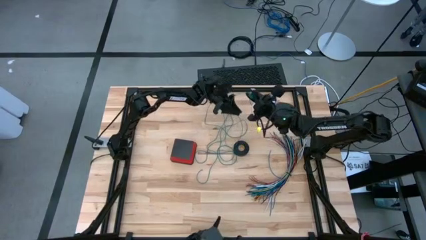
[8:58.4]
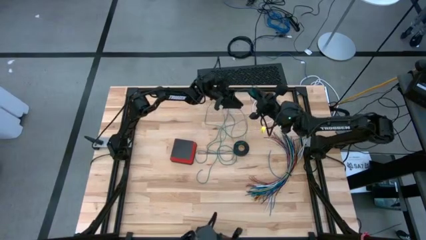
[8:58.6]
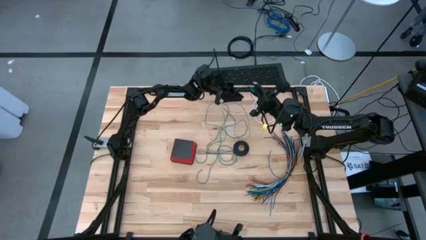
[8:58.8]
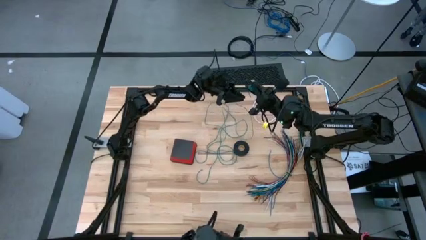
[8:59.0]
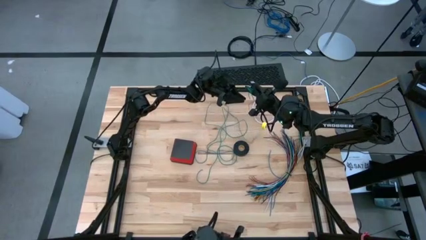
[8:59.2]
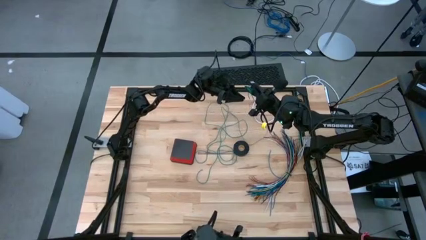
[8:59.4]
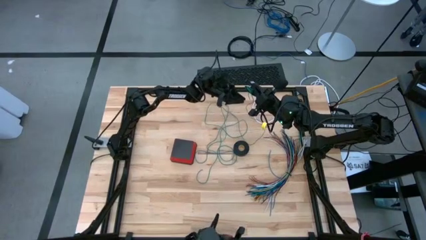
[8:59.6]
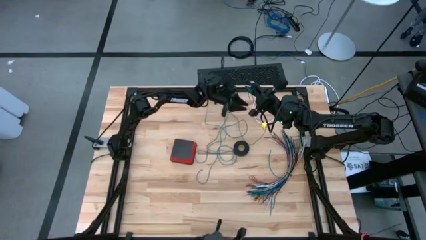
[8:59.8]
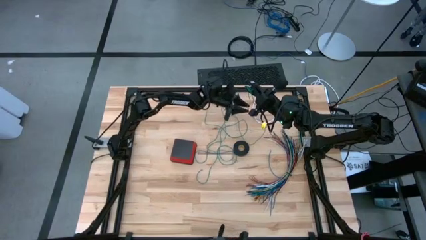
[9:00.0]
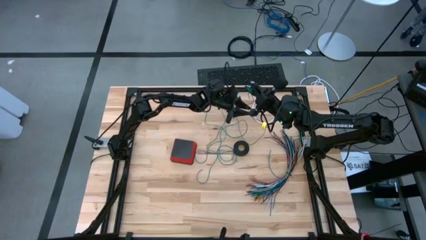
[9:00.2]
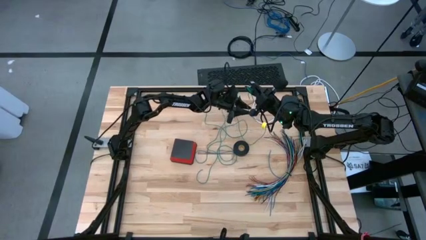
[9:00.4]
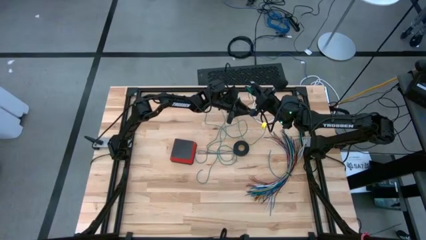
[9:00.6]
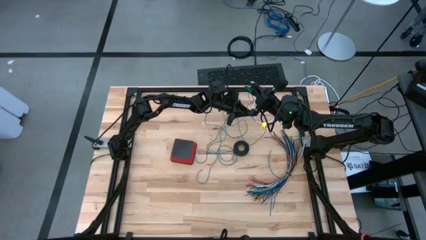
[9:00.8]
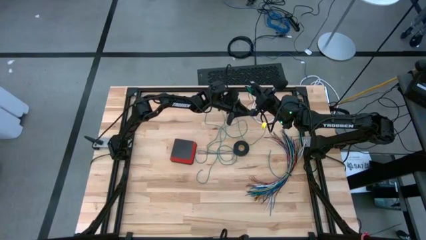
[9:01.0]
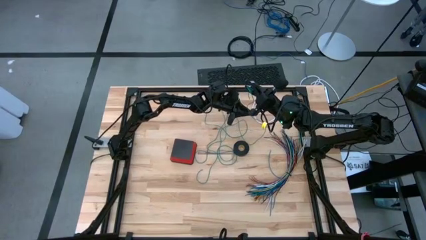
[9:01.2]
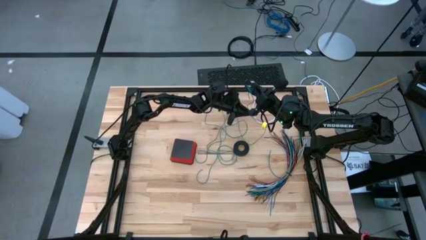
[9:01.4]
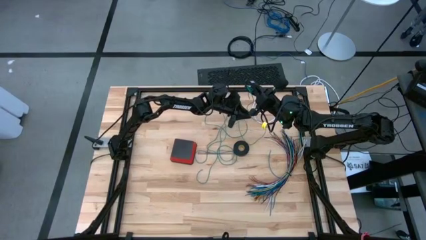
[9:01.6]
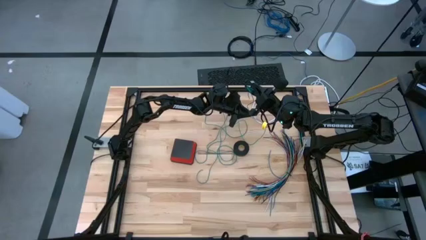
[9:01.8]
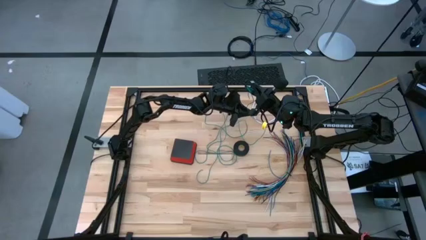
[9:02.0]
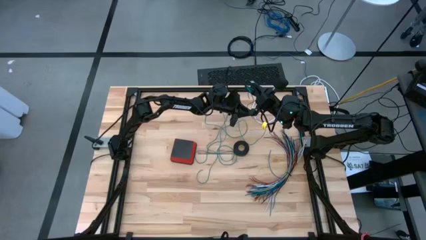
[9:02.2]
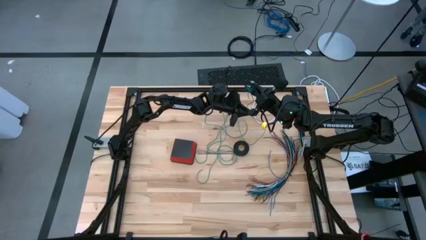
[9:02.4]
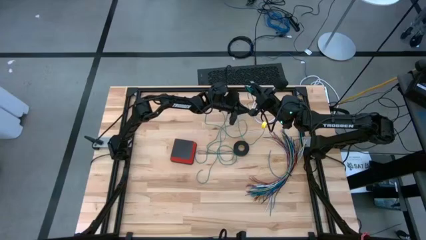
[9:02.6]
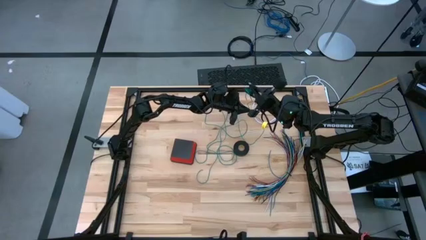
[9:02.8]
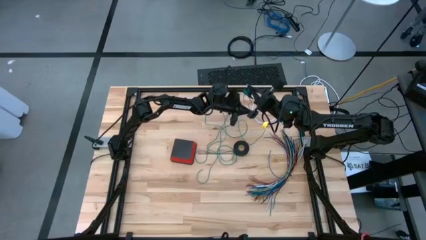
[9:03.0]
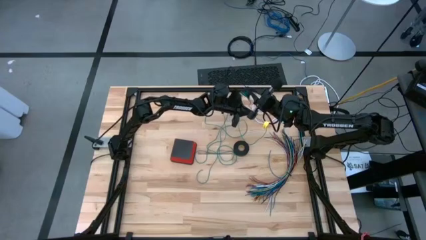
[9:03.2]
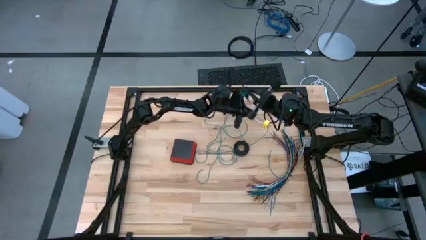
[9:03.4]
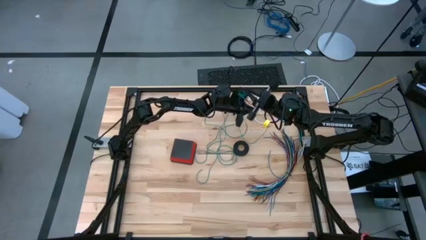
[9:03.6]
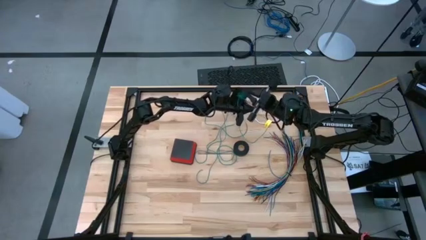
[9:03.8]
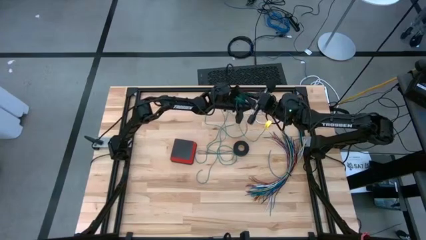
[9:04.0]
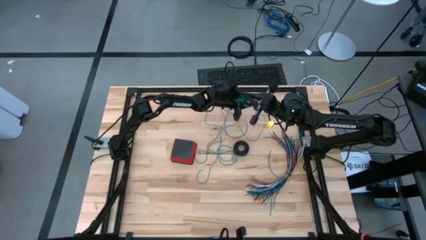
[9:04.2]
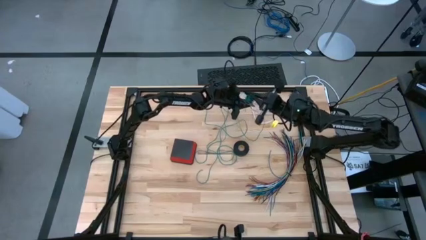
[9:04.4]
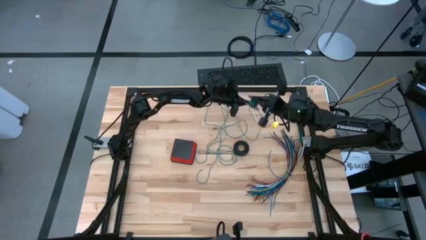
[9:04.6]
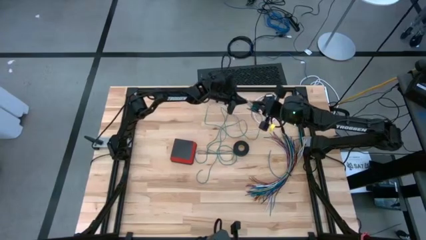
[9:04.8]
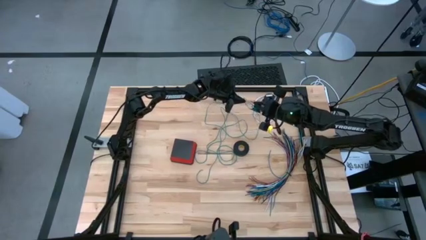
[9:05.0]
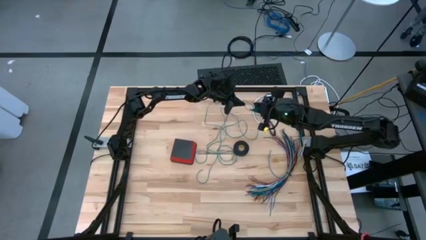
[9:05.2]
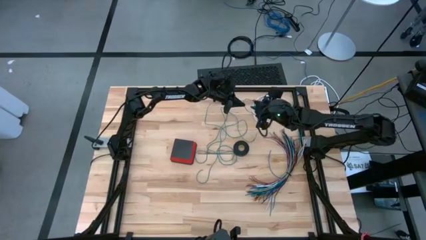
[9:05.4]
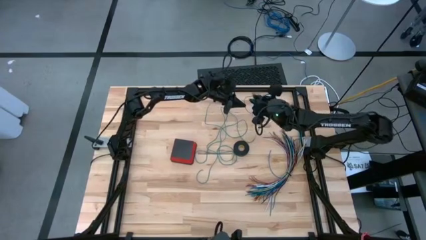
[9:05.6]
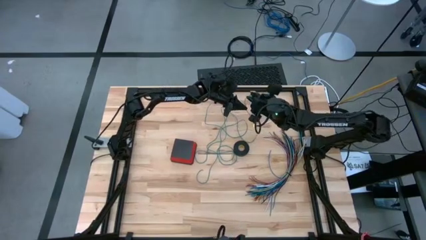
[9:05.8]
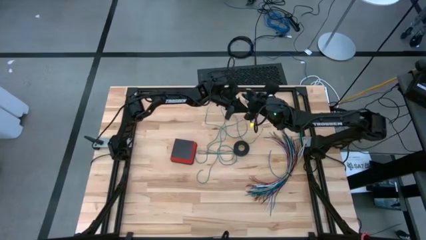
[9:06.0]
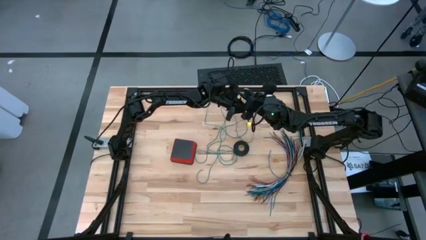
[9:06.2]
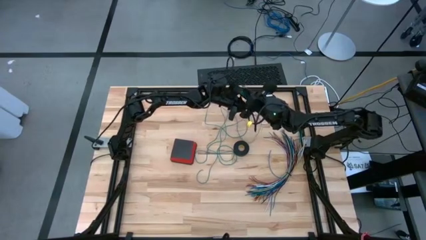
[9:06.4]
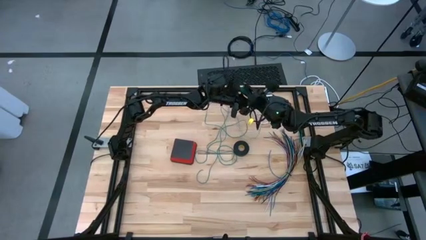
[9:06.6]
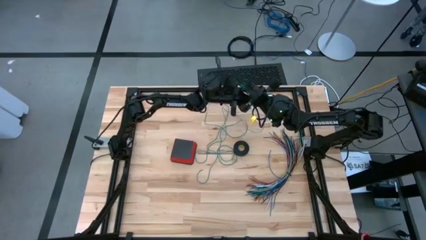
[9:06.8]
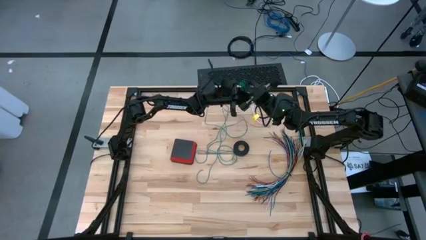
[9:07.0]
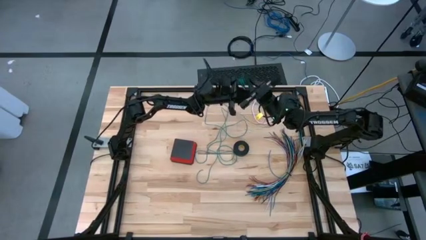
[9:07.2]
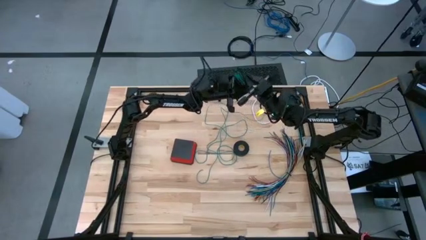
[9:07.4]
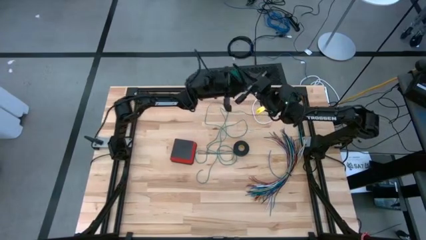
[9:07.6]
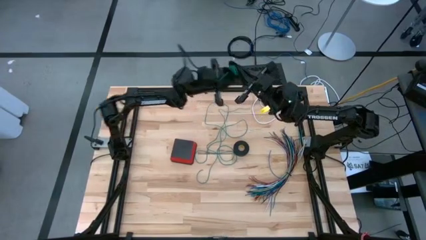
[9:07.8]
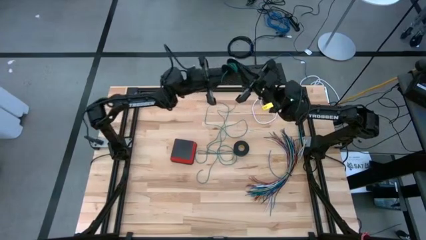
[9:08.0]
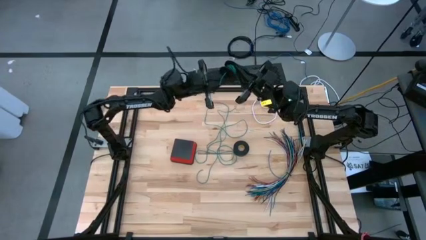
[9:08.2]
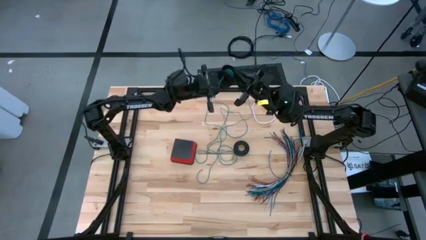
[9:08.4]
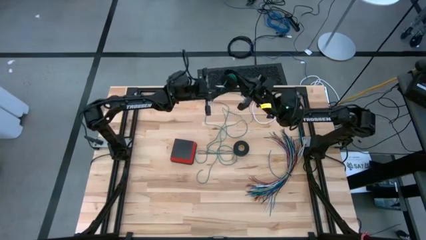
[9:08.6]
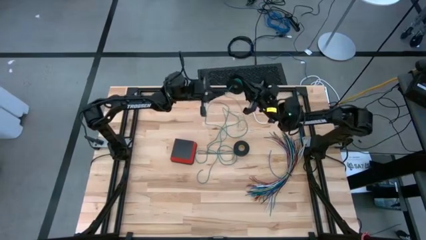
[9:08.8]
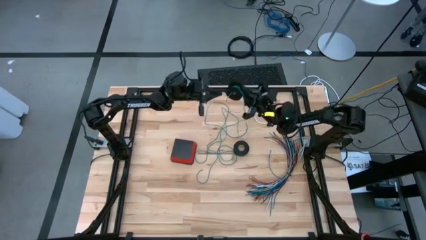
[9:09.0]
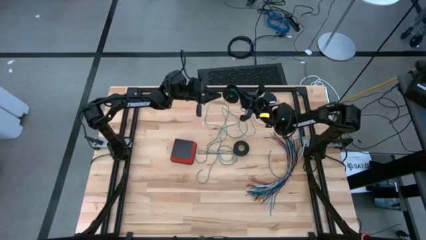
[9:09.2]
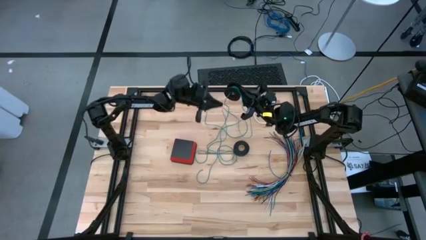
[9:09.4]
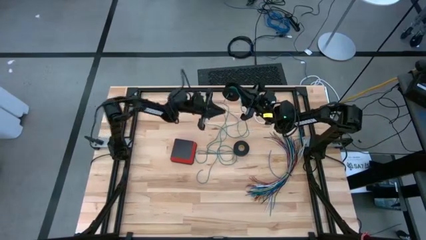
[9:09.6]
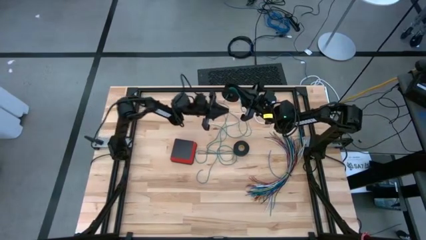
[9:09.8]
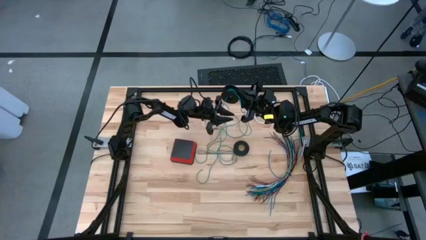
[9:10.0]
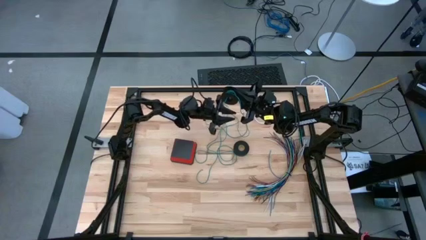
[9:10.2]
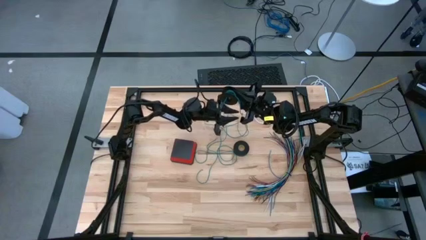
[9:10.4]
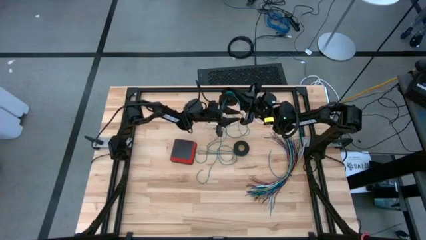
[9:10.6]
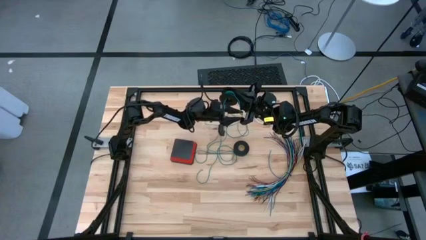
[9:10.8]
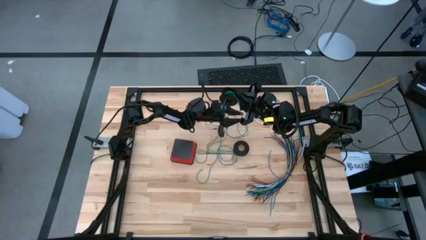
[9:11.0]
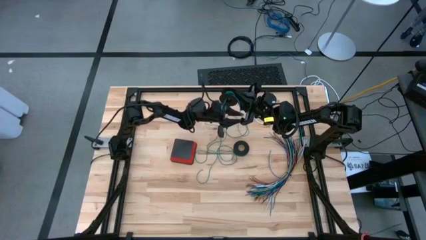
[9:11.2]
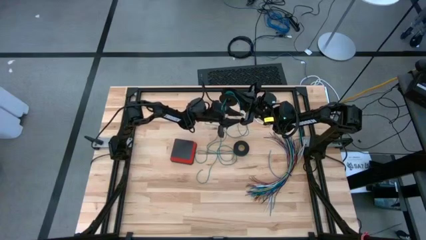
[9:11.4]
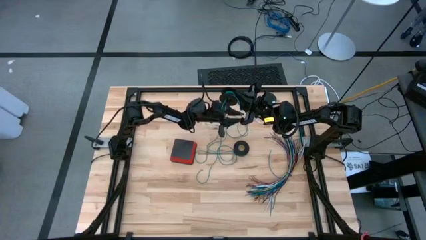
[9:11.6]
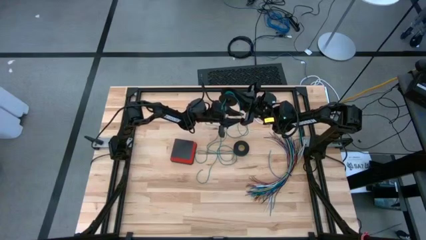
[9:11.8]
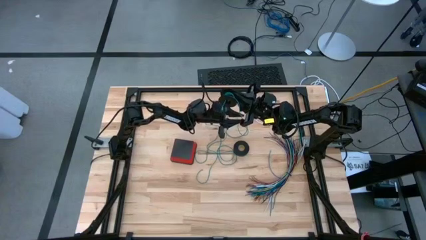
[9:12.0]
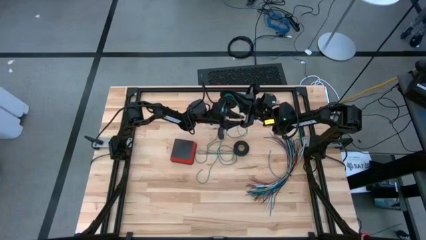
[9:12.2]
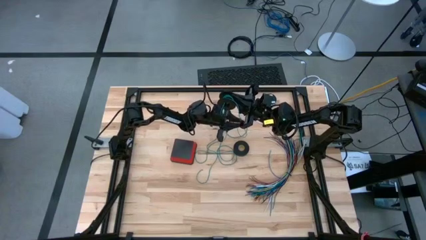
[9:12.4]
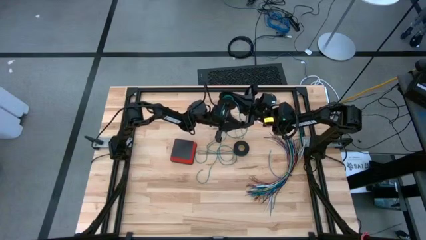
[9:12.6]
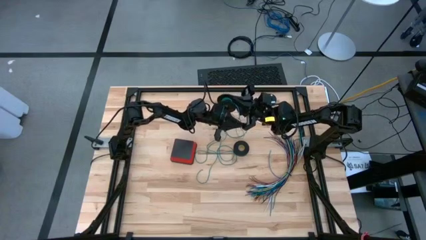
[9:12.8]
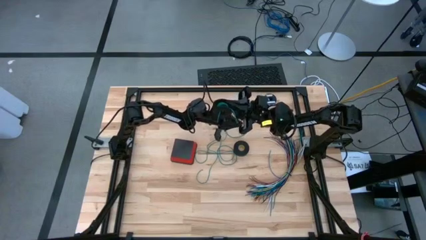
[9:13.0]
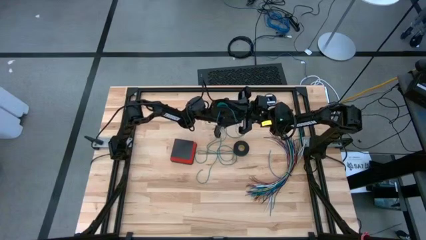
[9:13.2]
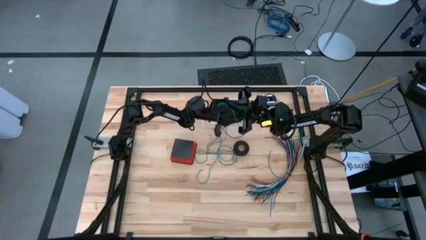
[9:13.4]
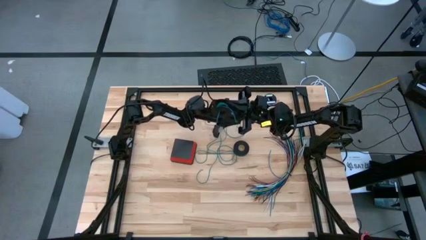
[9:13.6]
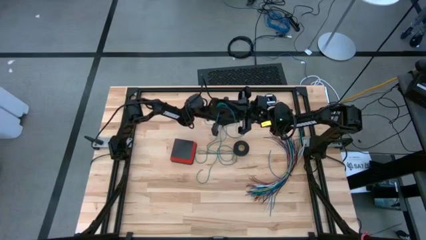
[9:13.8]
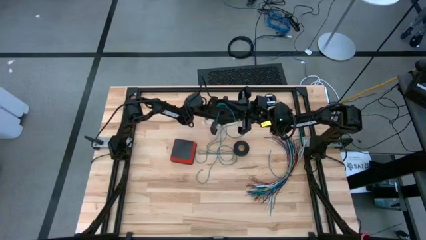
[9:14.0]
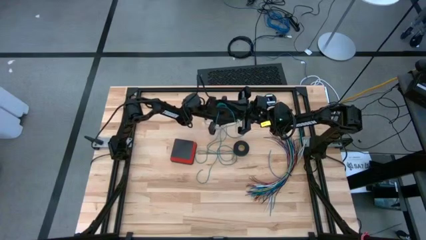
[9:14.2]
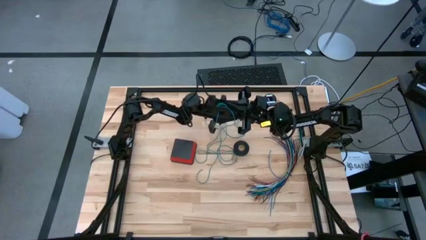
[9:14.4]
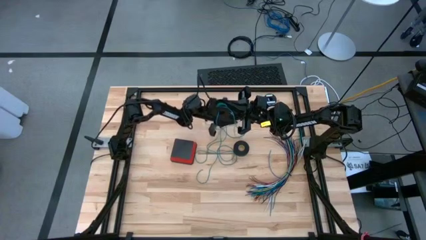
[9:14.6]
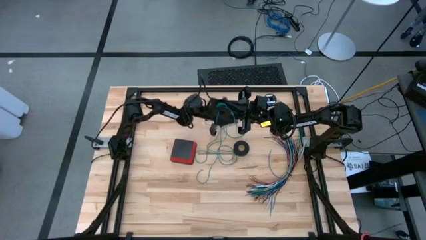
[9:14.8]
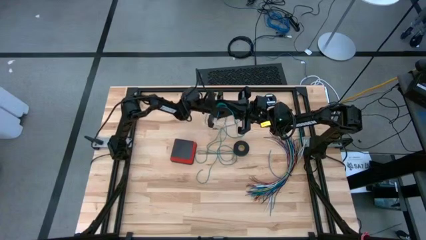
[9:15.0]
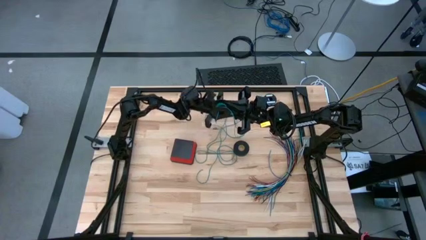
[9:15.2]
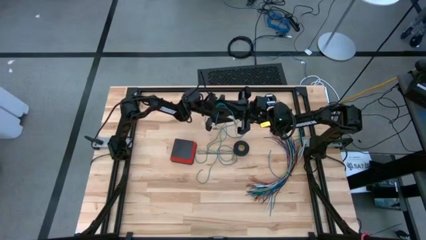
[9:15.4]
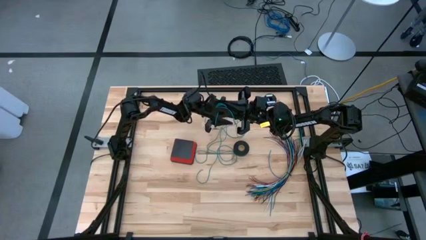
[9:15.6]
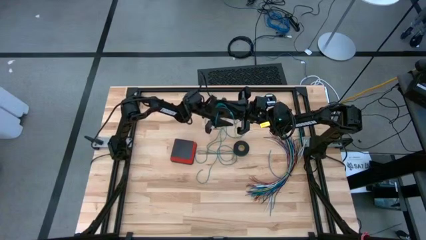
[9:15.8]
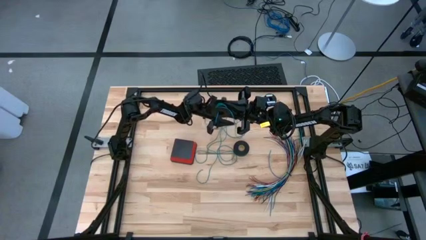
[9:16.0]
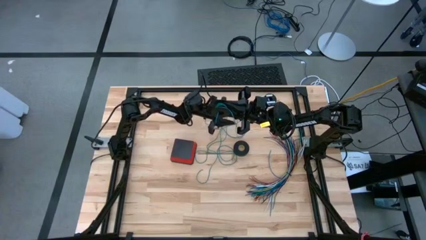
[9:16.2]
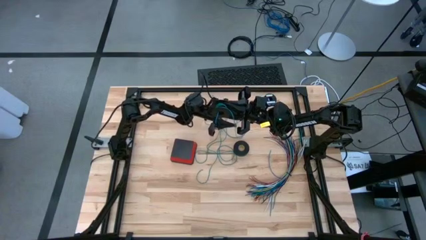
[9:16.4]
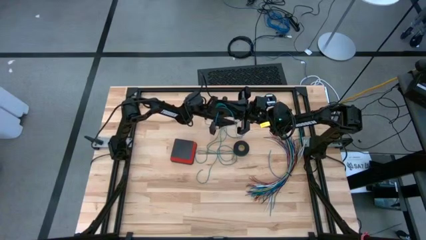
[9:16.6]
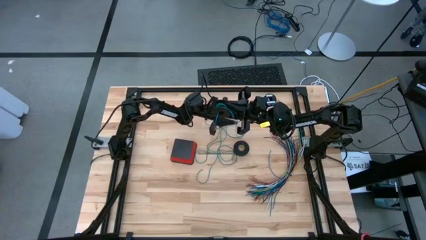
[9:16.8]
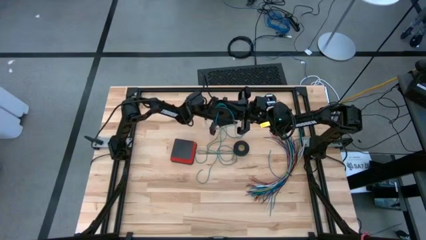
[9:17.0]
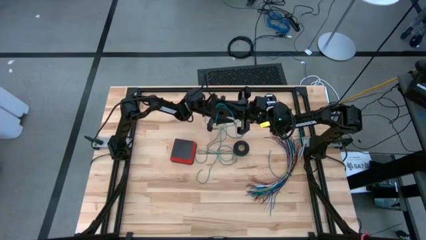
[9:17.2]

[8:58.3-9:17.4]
Task: Coiling cords
Coil the green wire cable on the spool
